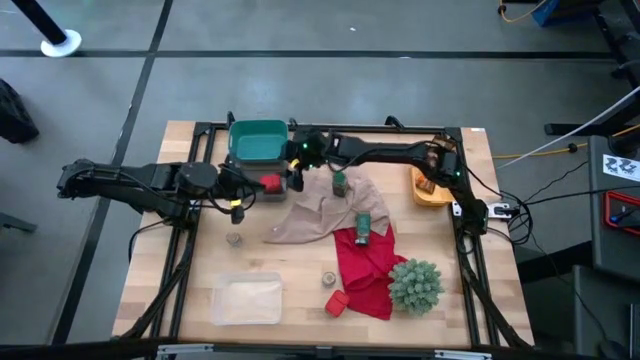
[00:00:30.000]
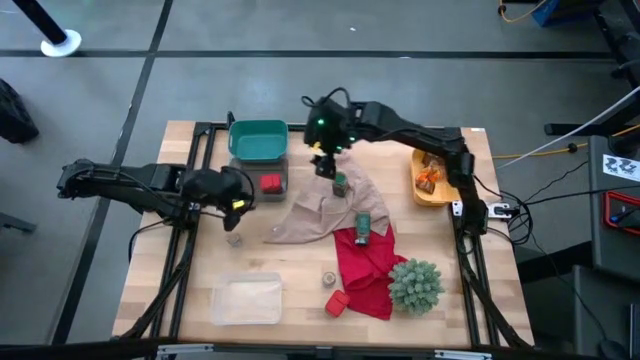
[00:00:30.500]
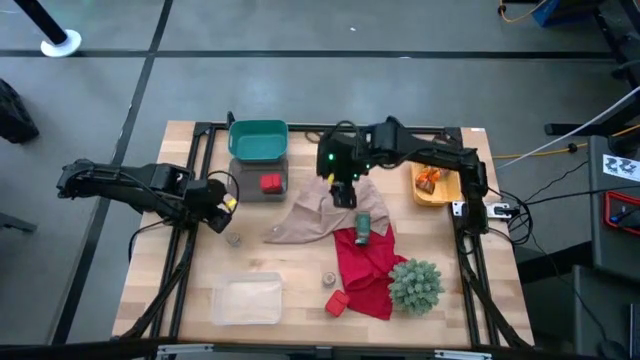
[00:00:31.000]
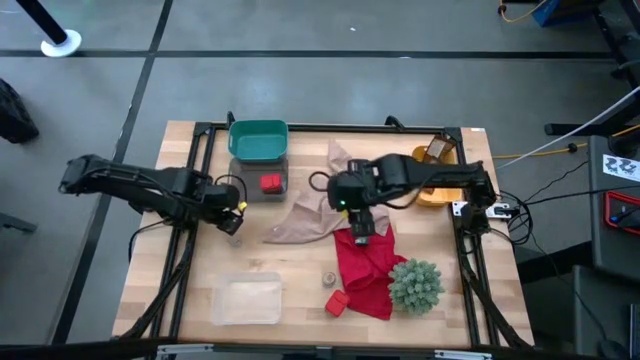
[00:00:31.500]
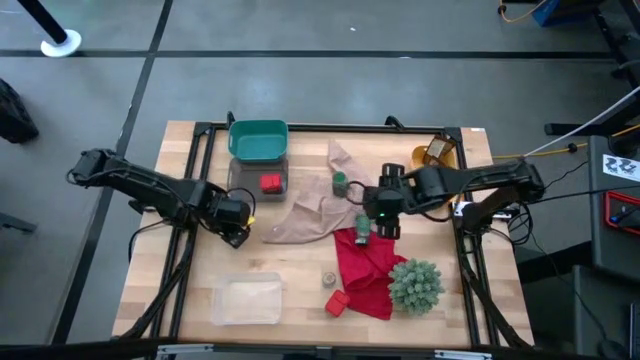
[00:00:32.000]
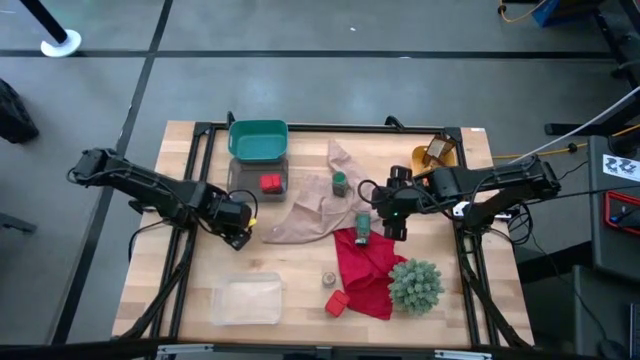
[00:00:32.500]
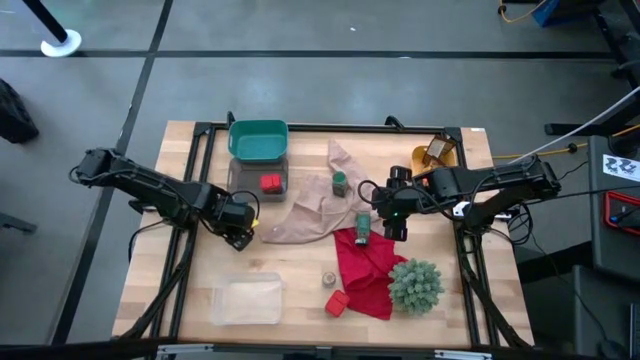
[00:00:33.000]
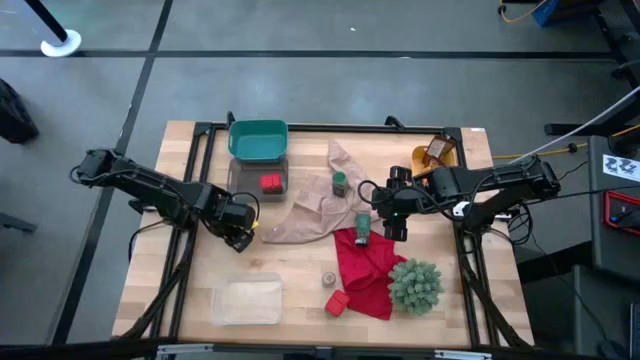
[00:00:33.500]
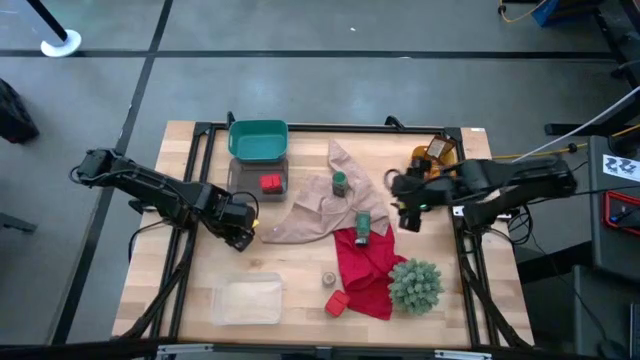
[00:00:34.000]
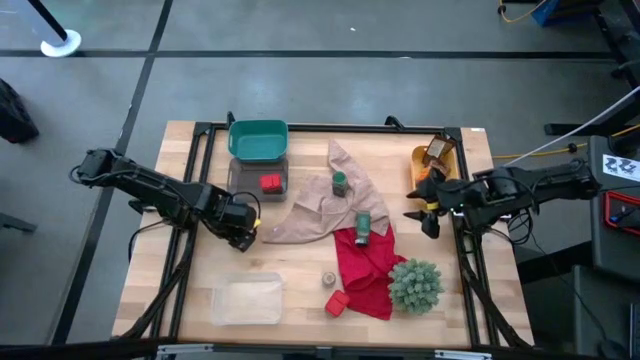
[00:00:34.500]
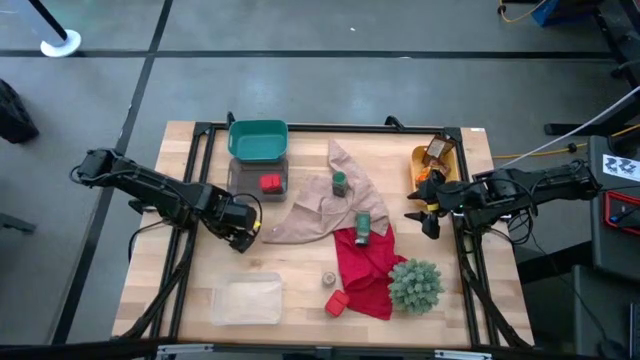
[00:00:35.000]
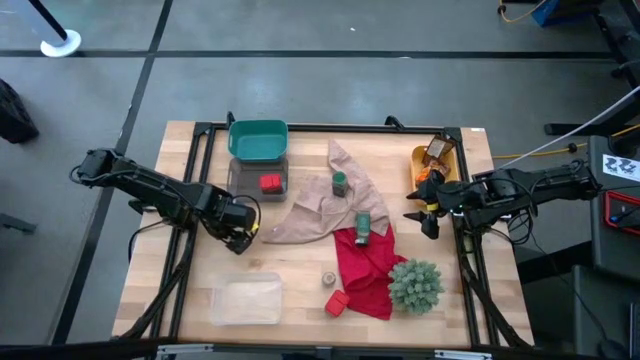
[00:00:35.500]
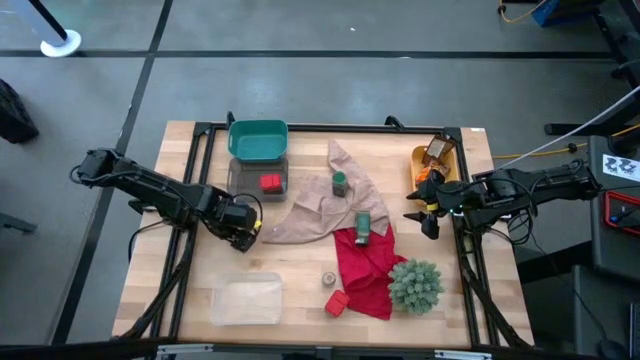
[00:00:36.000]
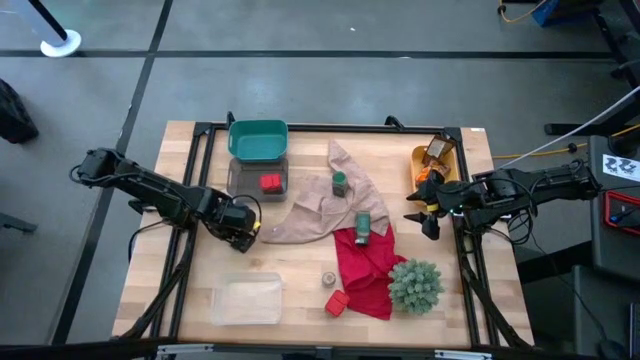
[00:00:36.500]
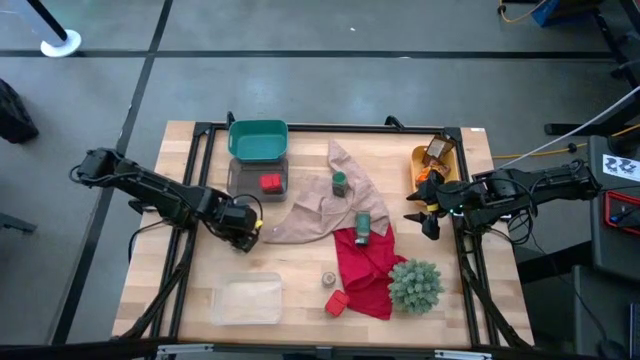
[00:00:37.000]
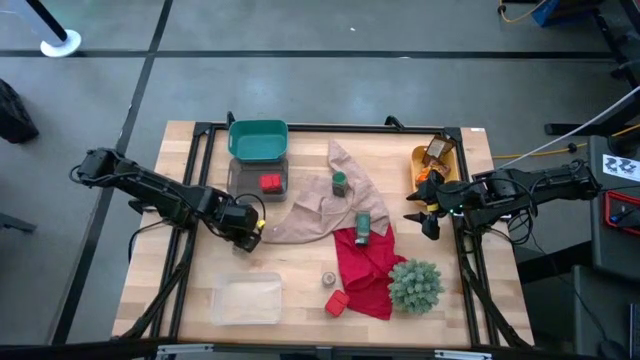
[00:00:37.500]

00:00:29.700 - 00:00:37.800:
Task: Sort spices by type
Put the left brown seasoning bottle into the transparent bin

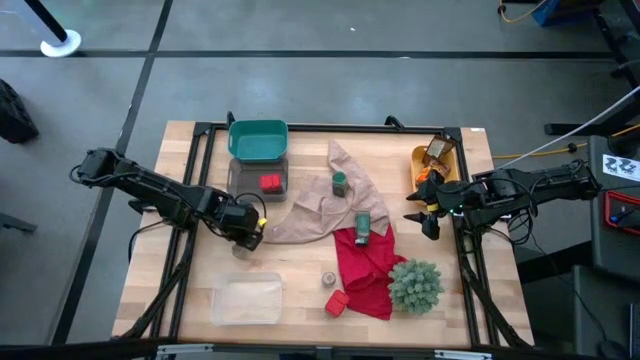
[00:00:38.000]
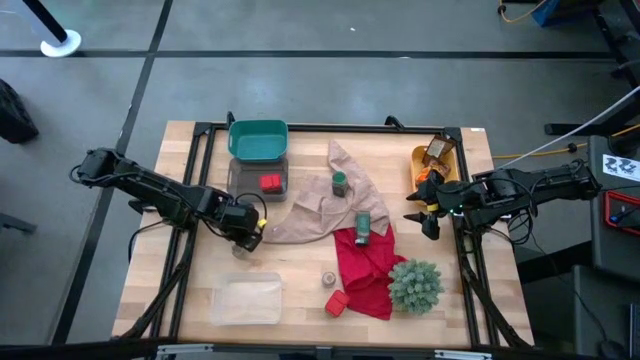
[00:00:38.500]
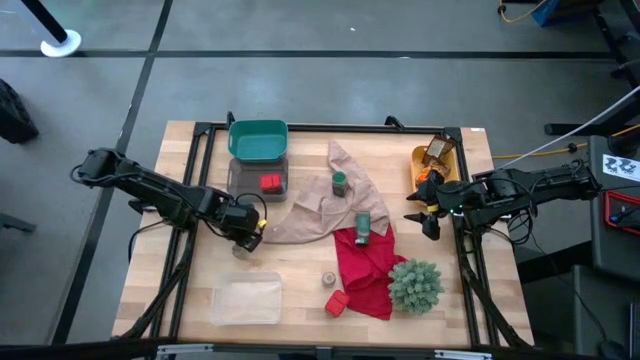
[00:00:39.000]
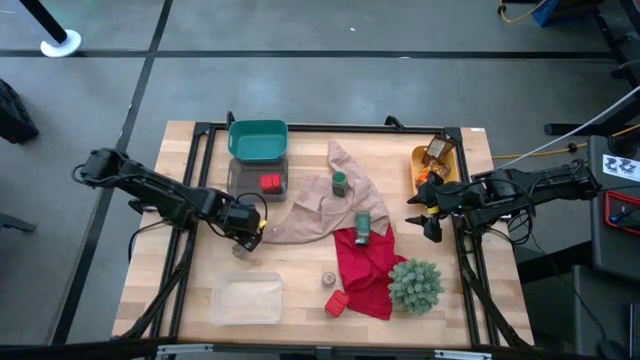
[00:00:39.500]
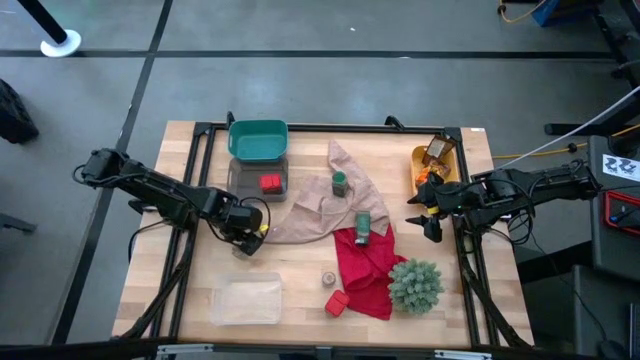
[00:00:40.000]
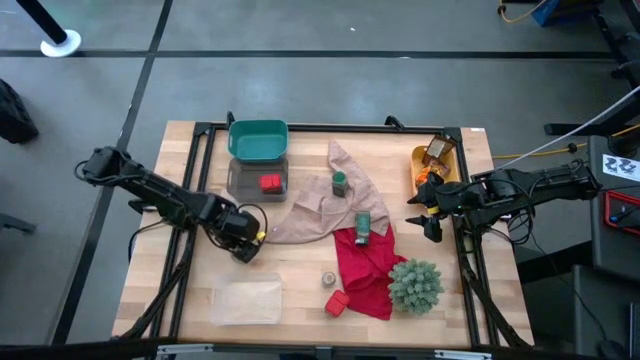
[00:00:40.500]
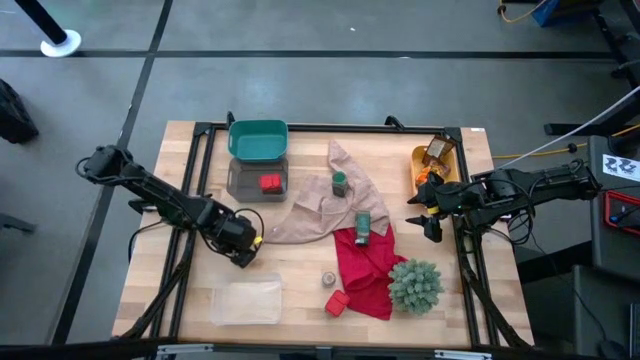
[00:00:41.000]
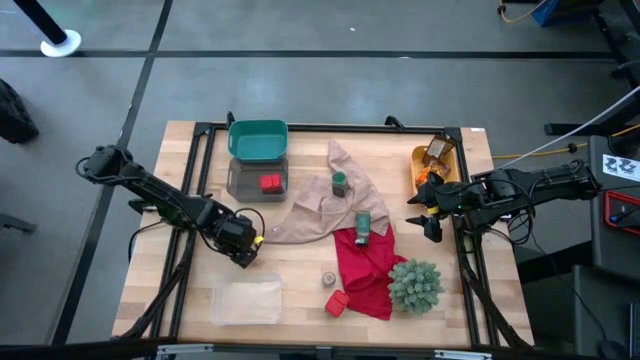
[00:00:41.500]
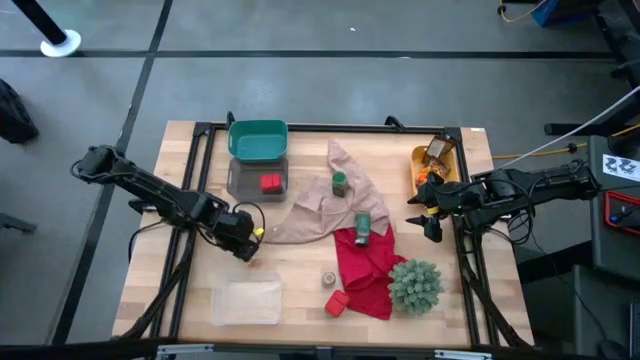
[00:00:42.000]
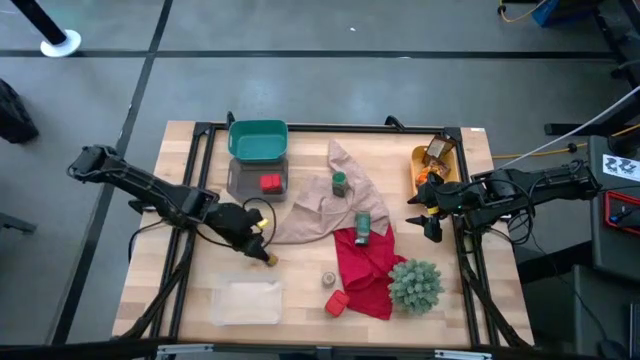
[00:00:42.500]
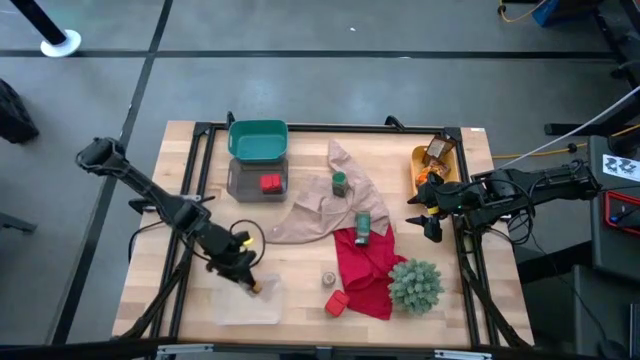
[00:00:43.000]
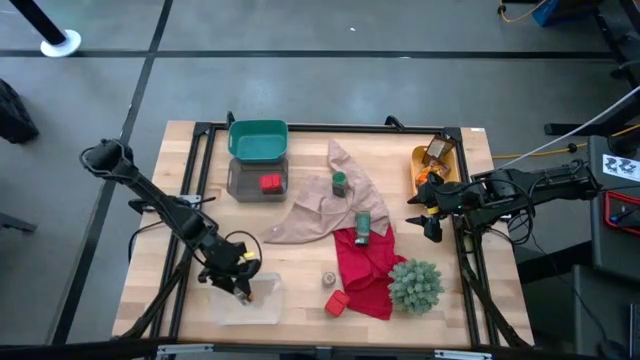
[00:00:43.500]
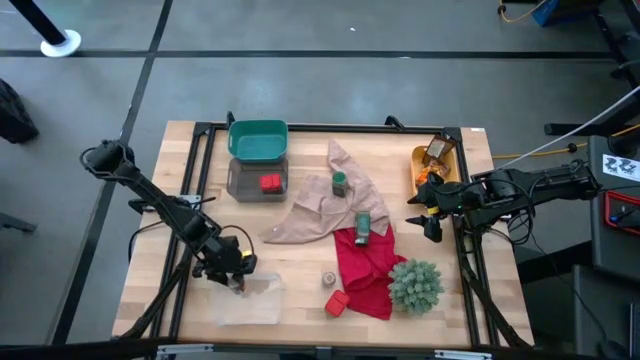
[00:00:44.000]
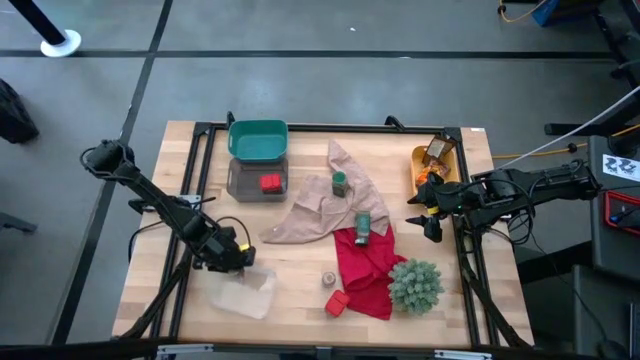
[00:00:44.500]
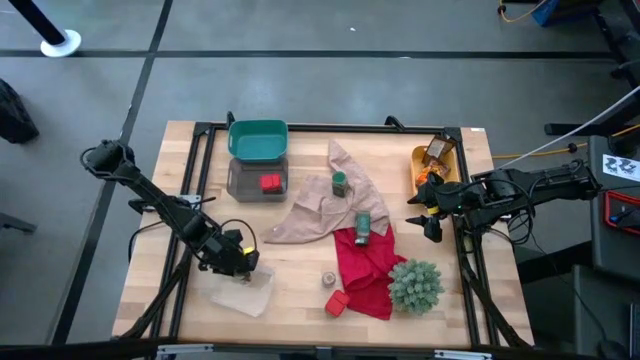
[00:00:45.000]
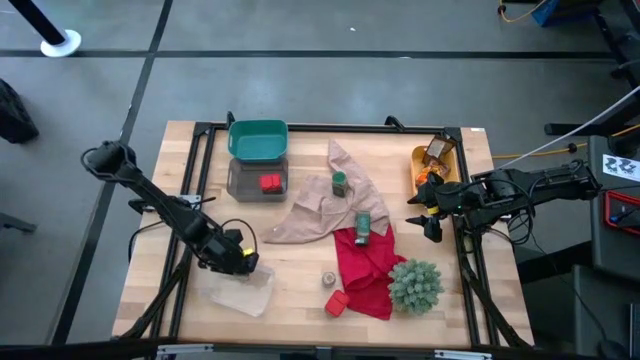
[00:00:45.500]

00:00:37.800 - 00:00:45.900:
Put the left brown seasoning bottle into the transparent bin

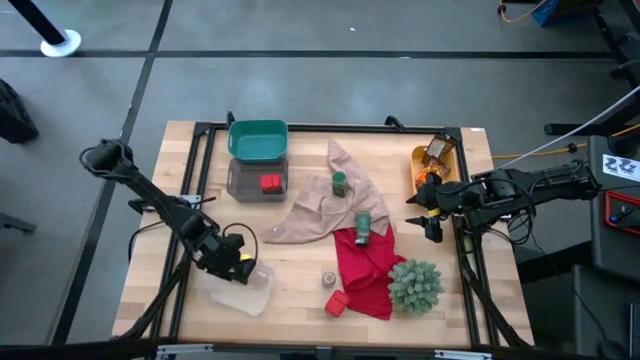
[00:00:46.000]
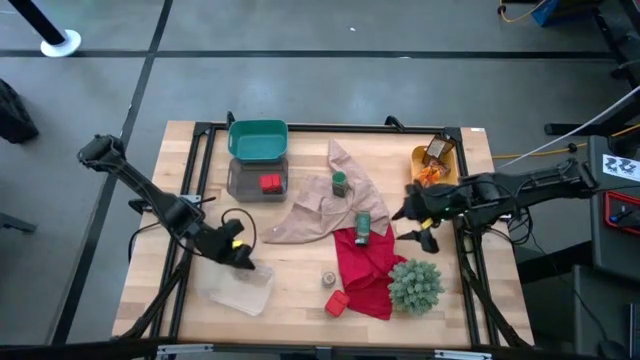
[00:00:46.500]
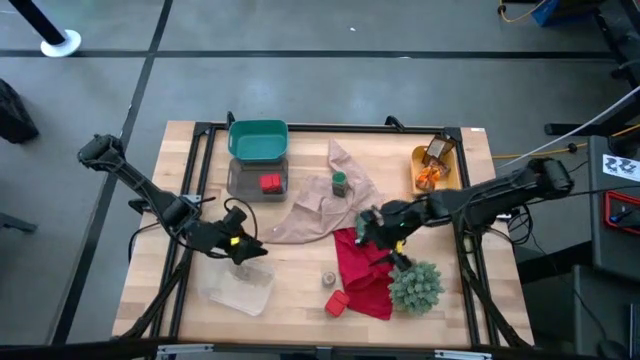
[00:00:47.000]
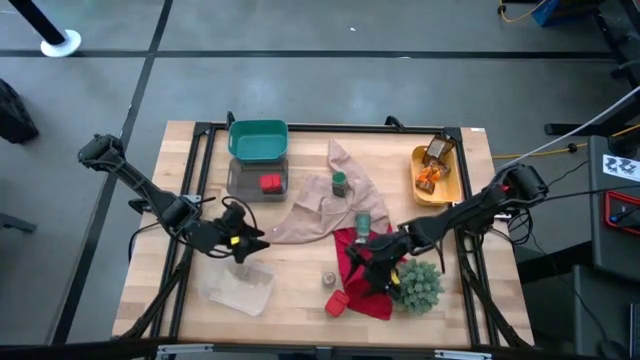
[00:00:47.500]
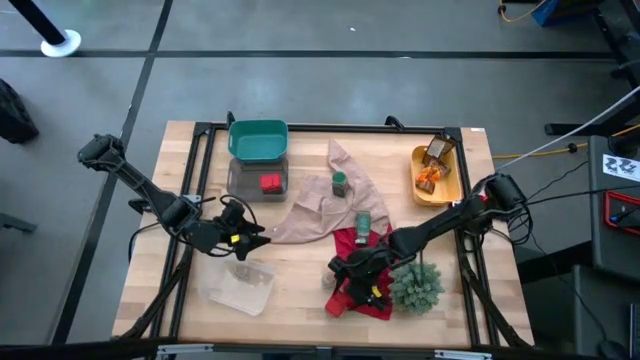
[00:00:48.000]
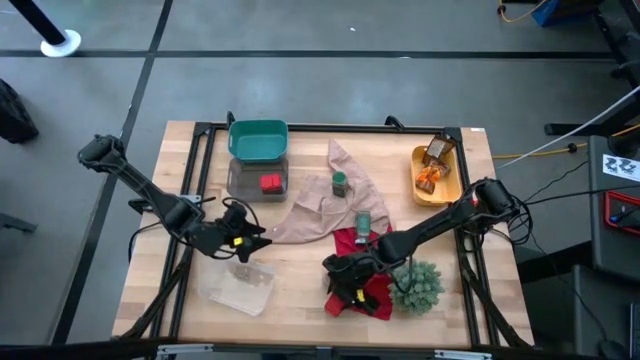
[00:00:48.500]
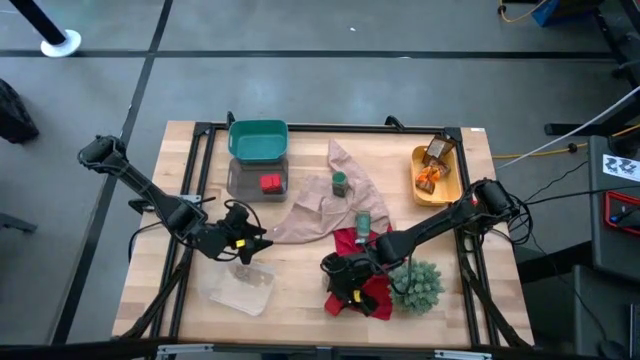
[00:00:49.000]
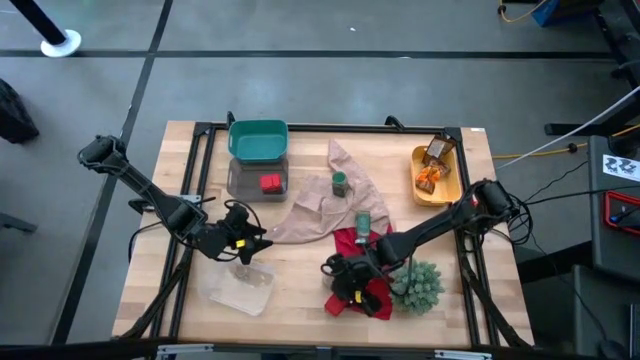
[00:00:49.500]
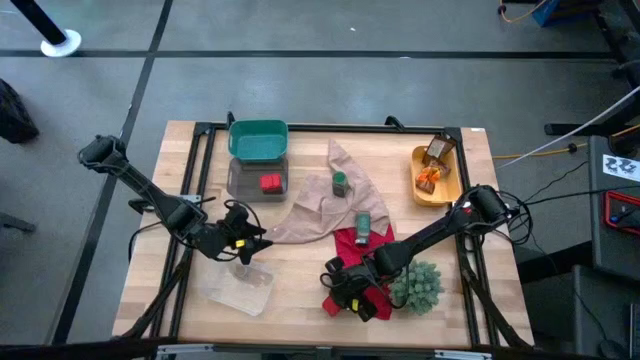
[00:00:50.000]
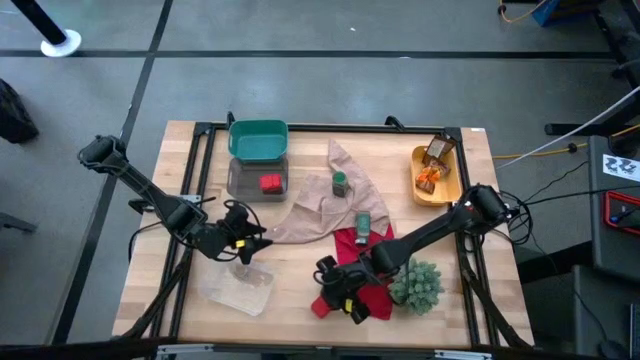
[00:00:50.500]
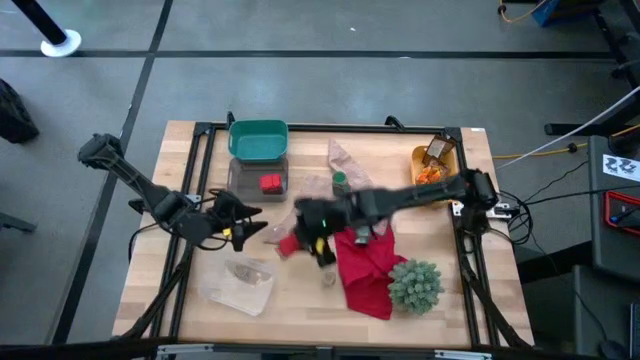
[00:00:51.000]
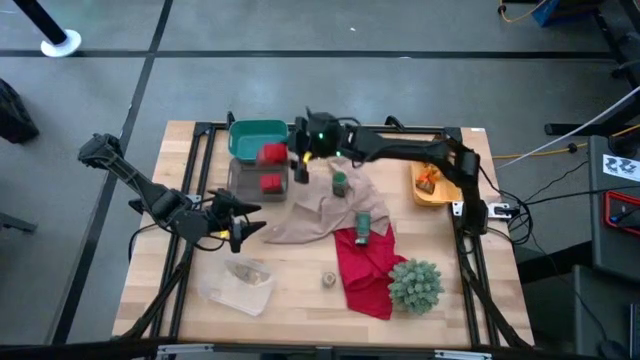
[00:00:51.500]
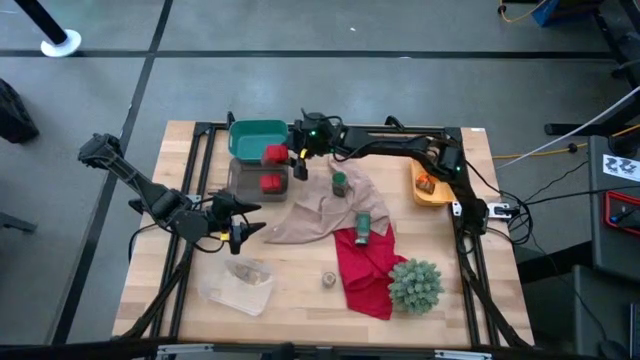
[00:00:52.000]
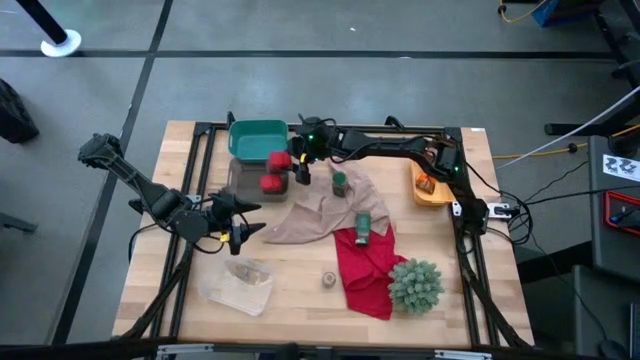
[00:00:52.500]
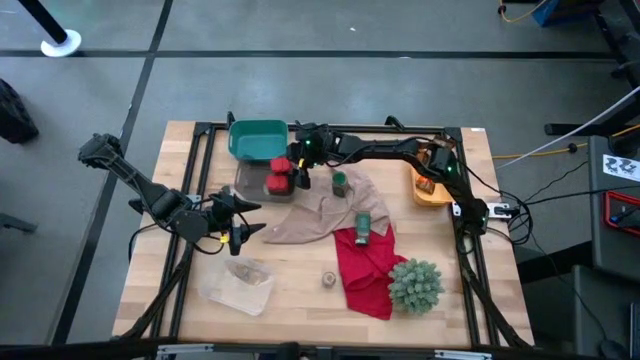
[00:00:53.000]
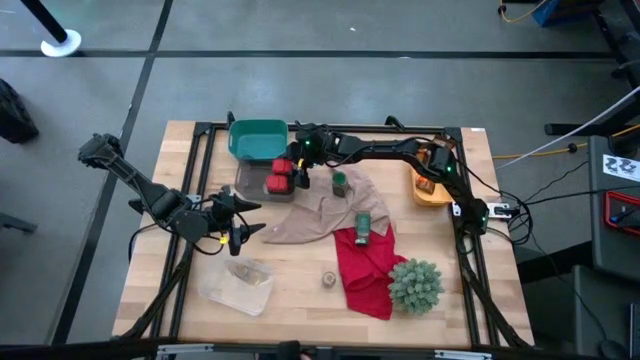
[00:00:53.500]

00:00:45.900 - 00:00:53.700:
Put the red seasoning can into the black transparent bin
